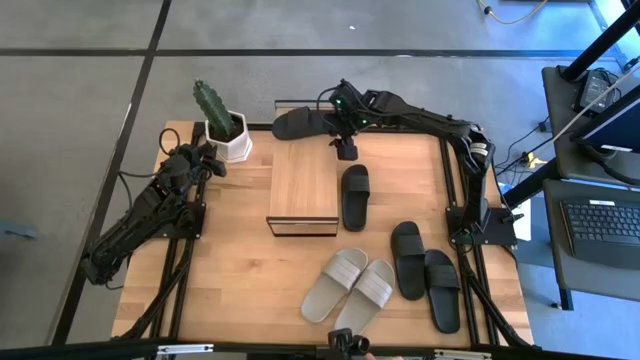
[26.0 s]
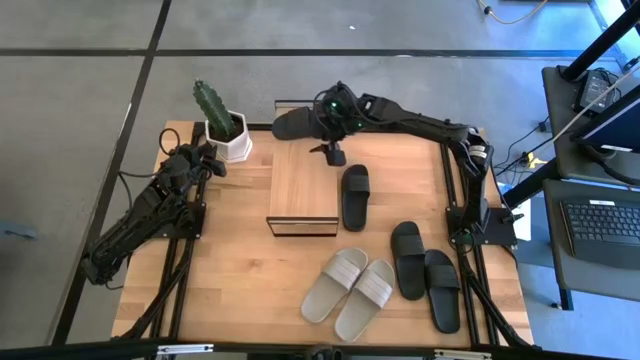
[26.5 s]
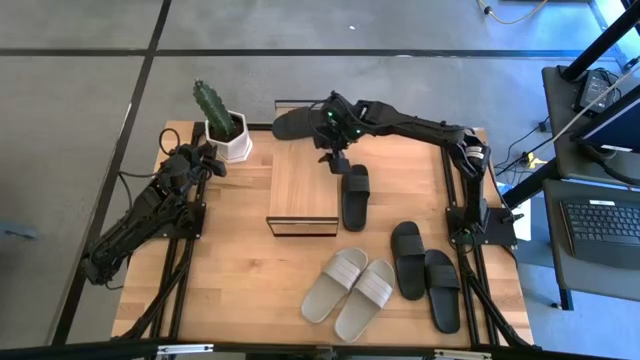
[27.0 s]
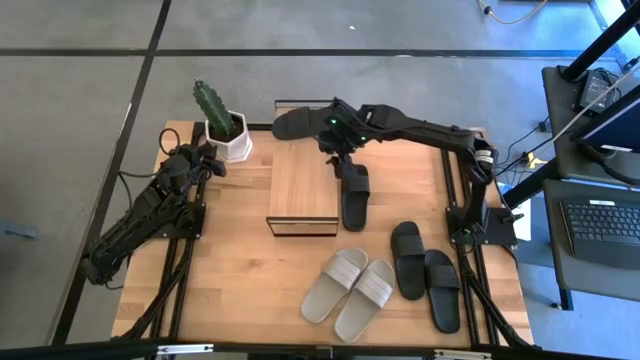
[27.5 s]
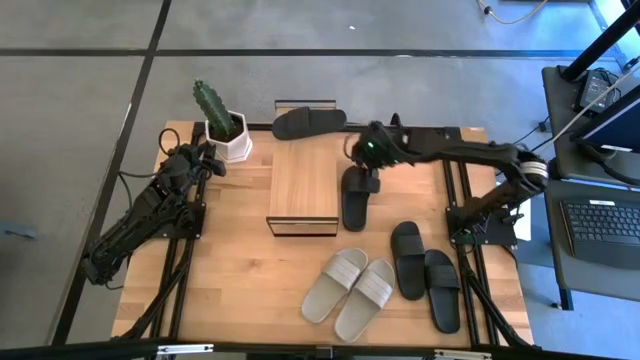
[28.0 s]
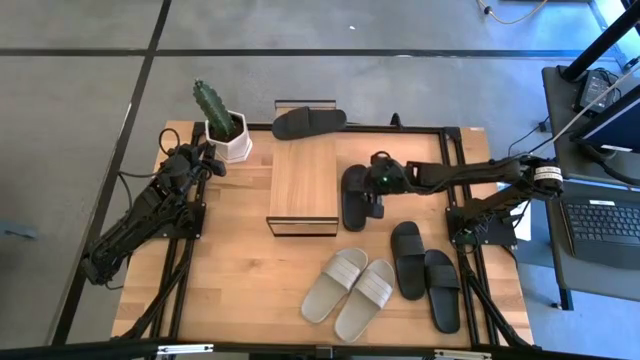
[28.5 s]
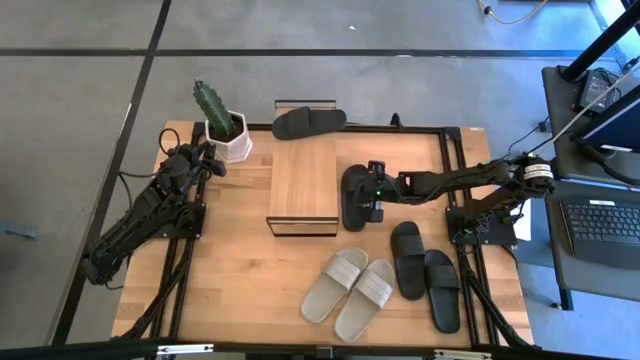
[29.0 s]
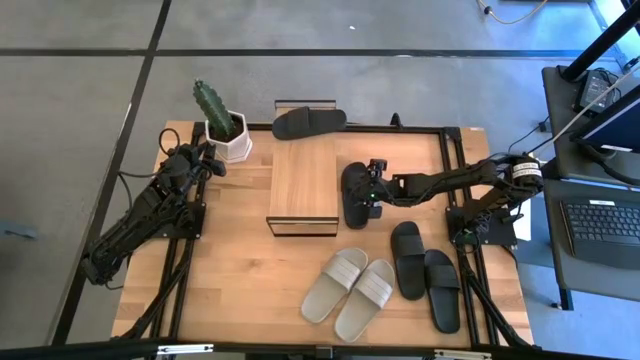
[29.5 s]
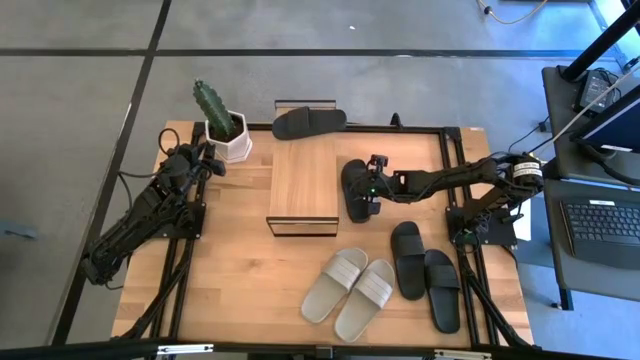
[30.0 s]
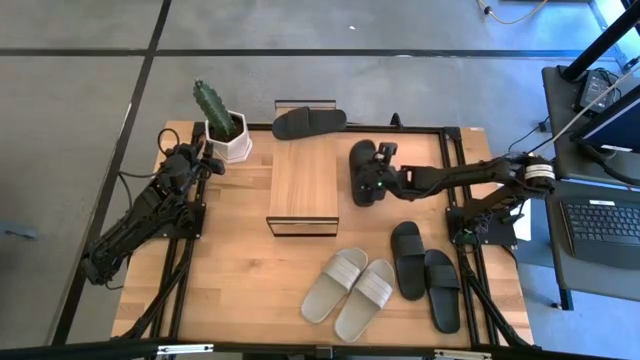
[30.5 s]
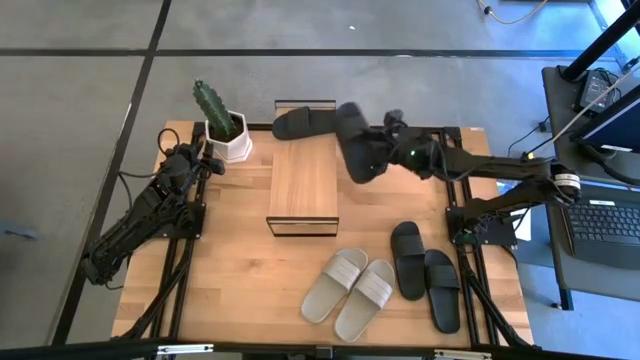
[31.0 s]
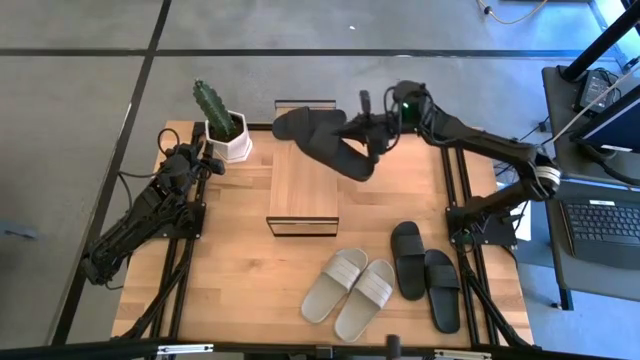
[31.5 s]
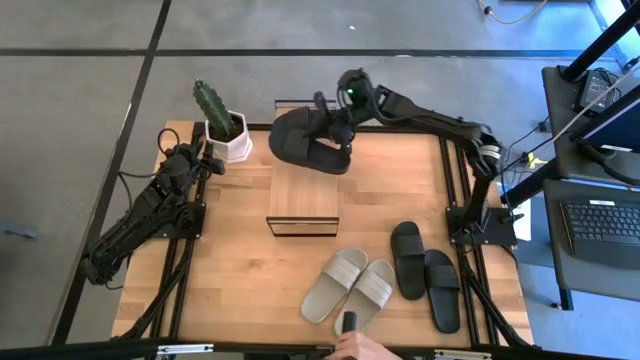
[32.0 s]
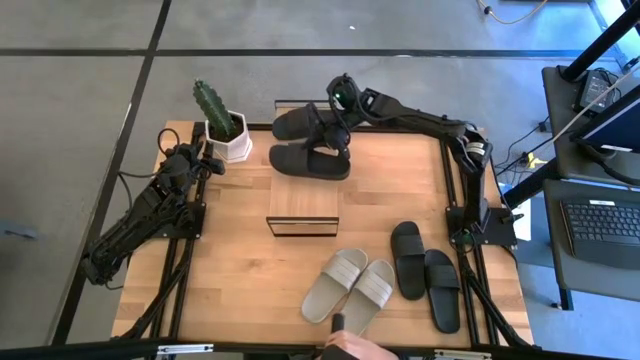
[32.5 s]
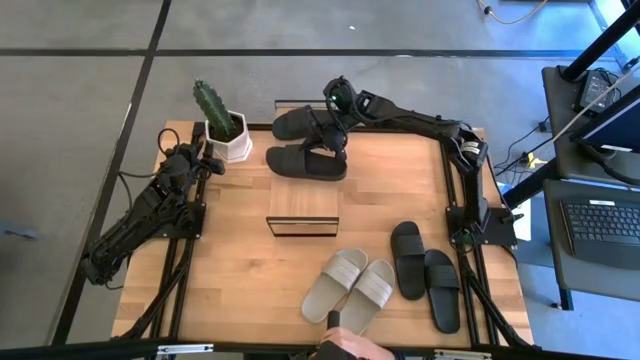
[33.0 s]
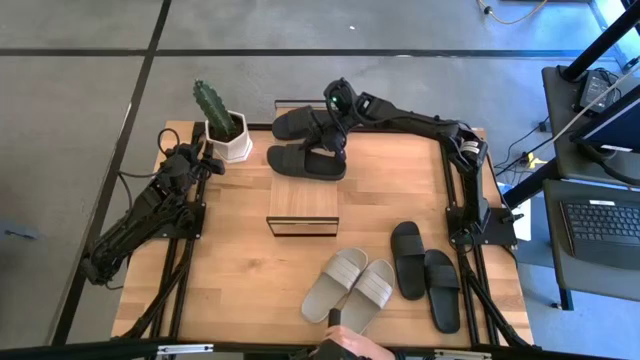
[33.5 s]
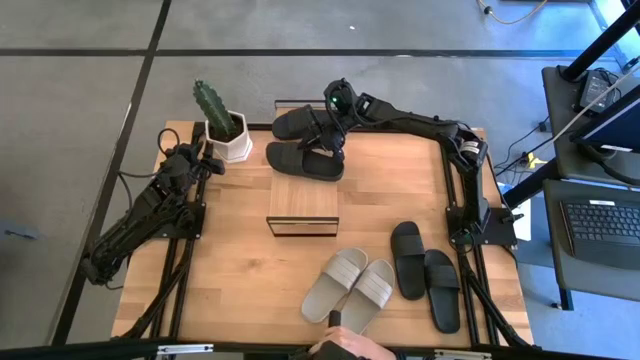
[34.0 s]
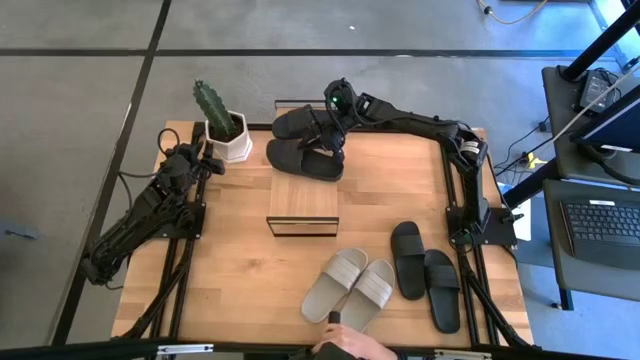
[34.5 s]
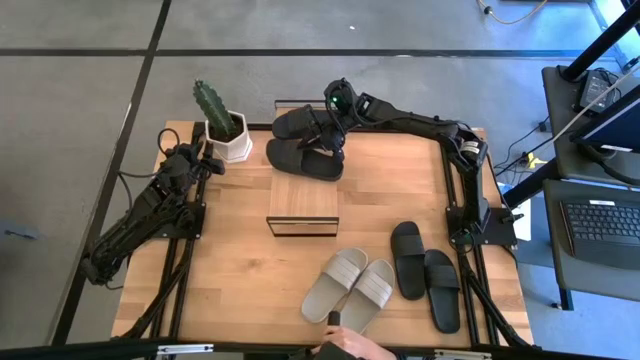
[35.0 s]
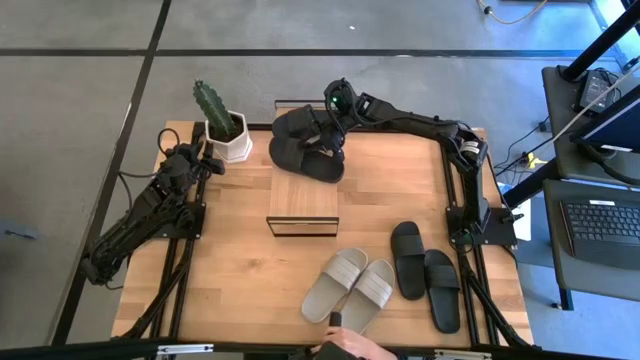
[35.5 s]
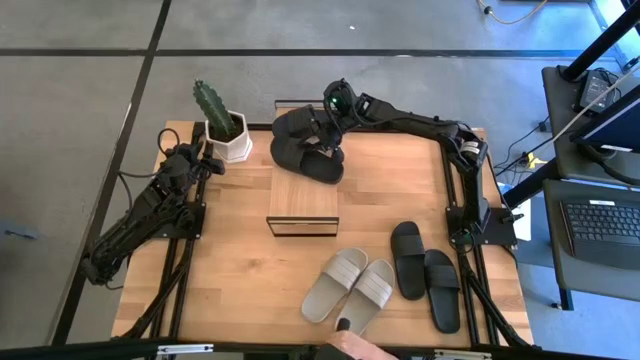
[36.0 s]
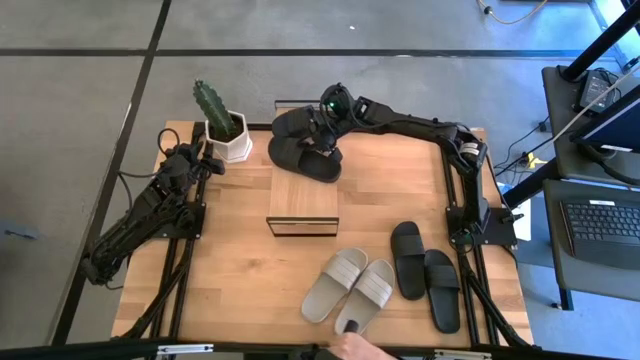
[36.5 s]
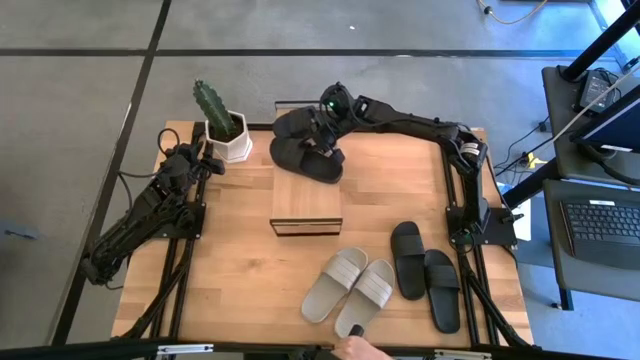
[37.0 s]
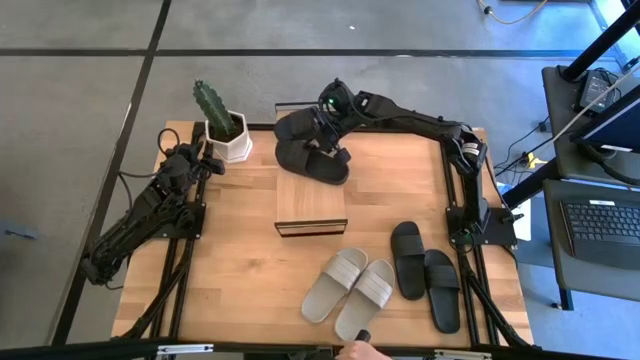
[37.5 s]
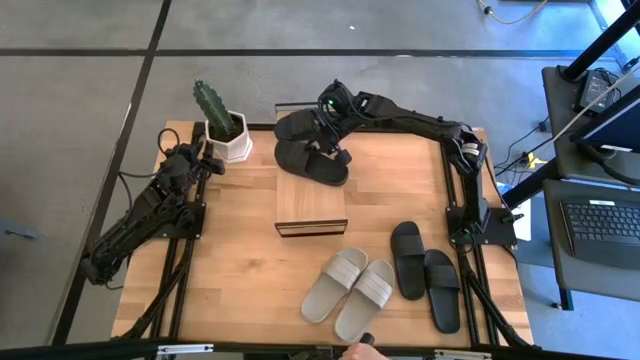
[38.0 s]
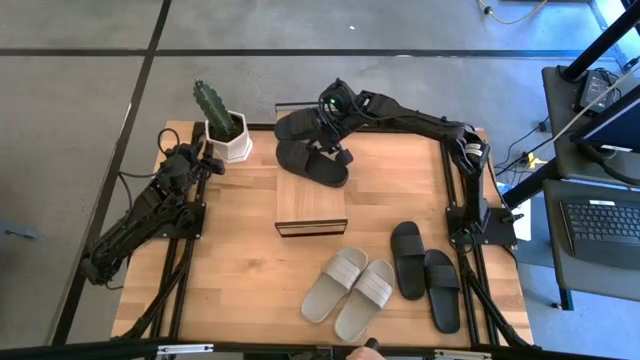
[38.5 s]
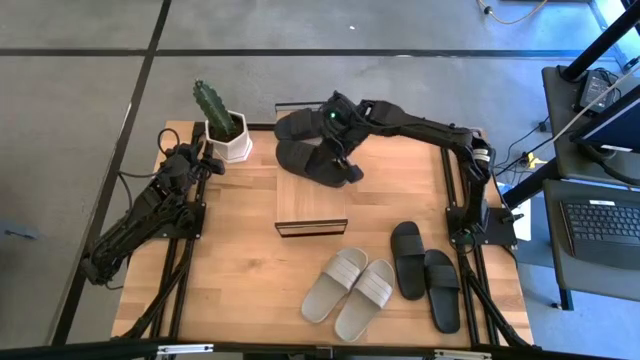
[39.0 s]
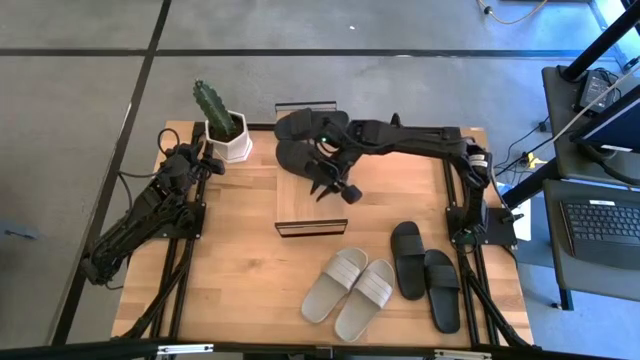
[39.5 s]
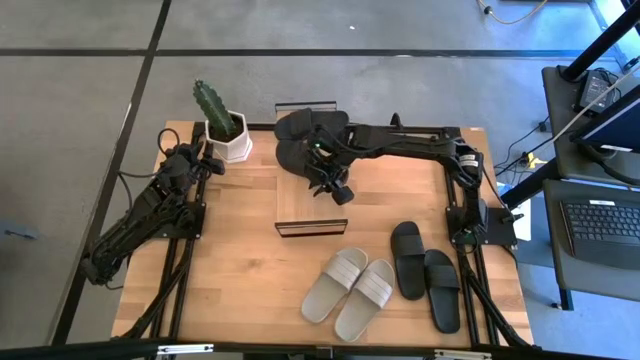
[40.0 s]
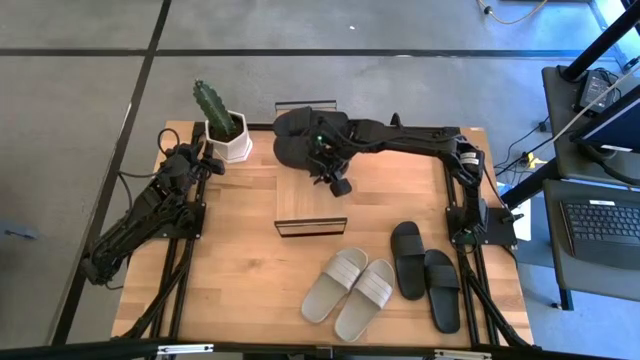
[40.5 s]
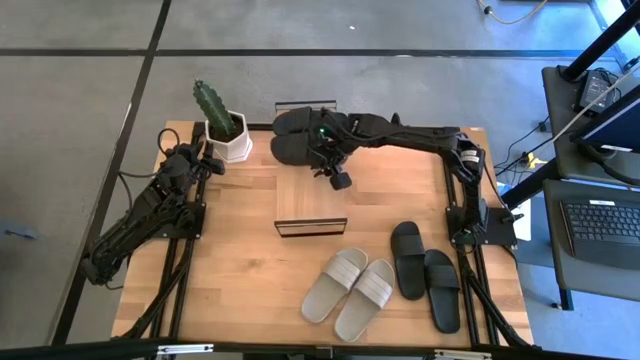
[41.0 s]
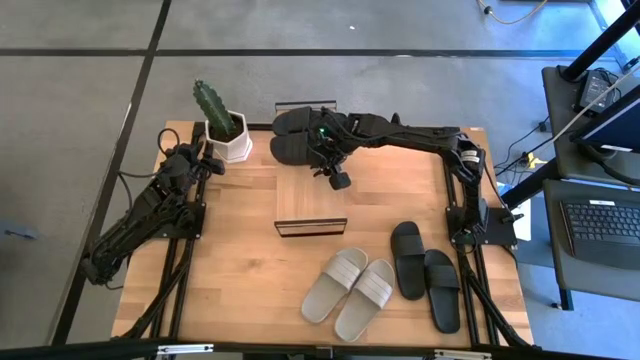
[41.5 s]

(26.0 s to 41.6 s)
Task: Pick and place slides into the shelf
Put the top left black slide on the shelf

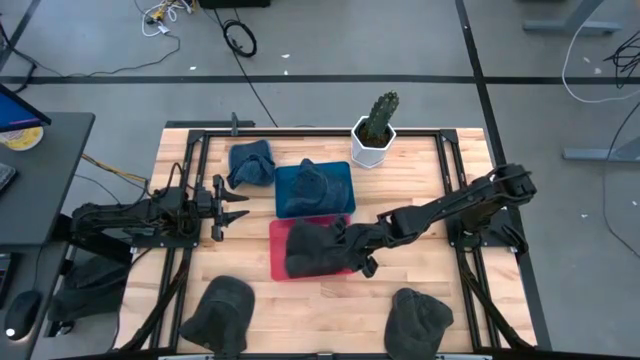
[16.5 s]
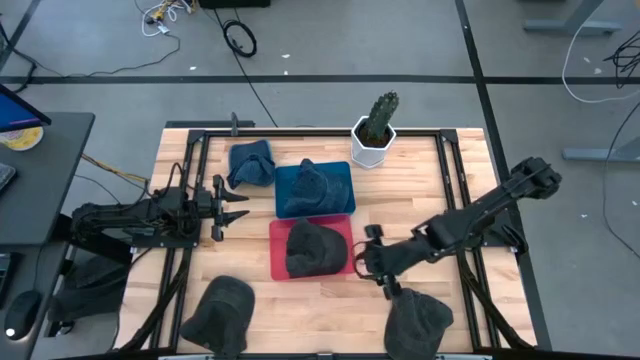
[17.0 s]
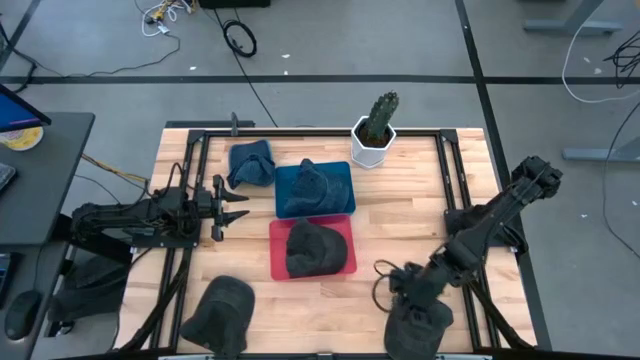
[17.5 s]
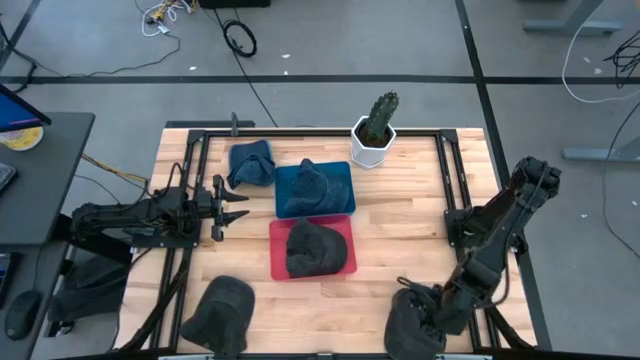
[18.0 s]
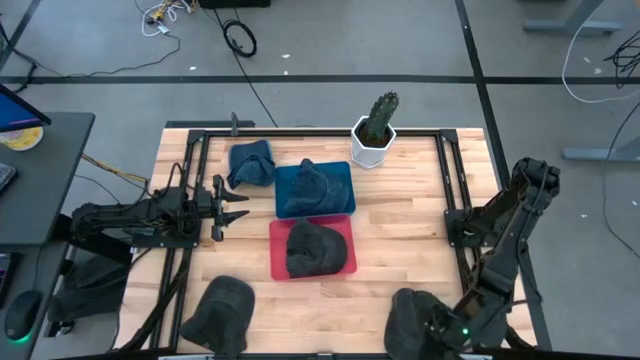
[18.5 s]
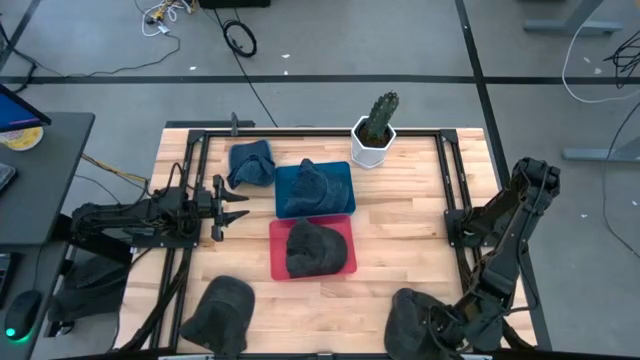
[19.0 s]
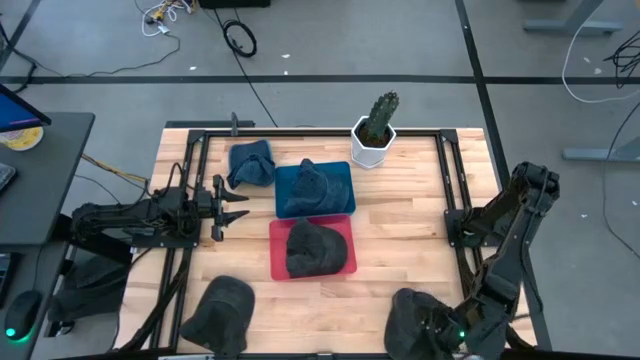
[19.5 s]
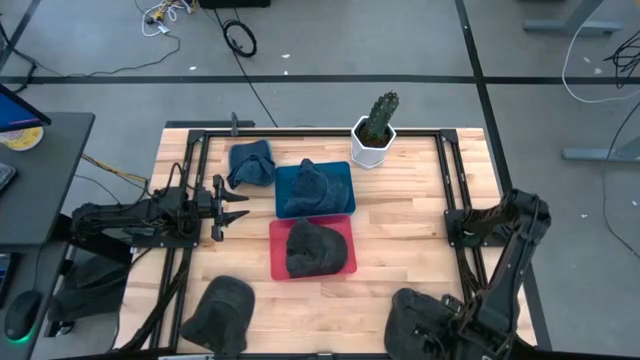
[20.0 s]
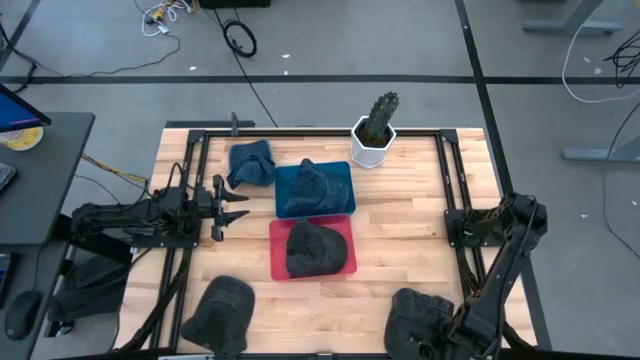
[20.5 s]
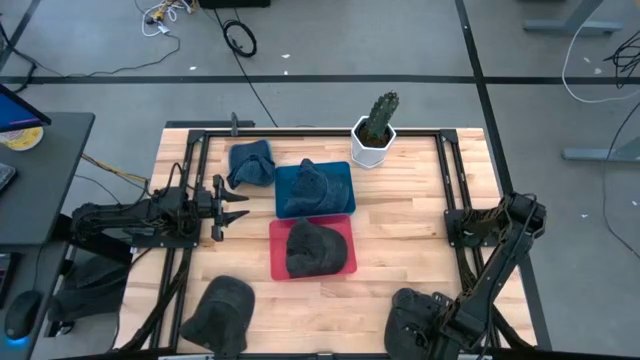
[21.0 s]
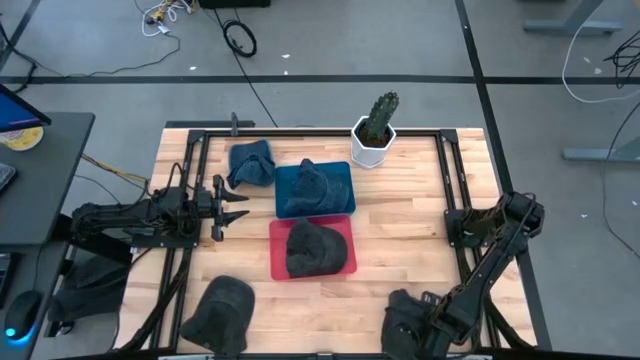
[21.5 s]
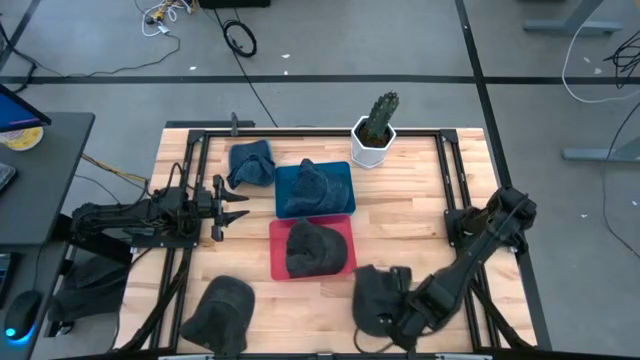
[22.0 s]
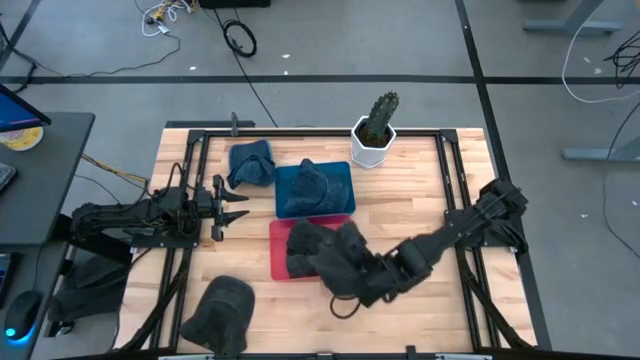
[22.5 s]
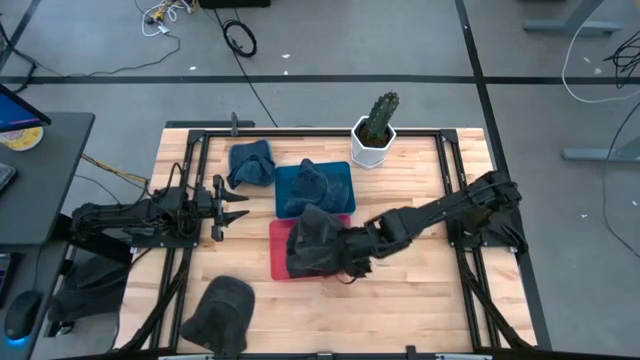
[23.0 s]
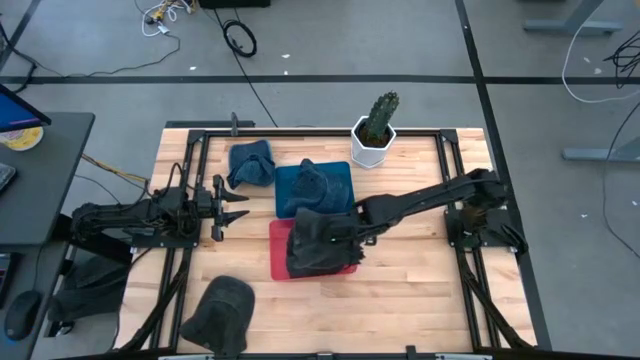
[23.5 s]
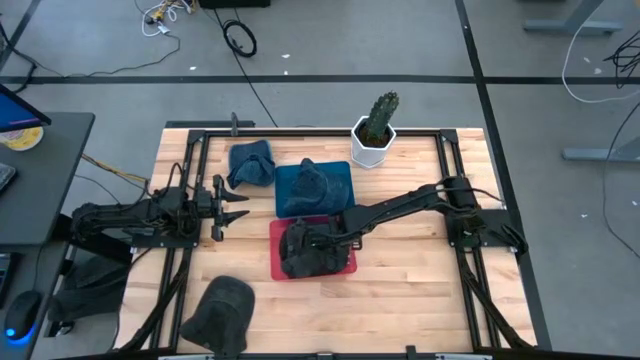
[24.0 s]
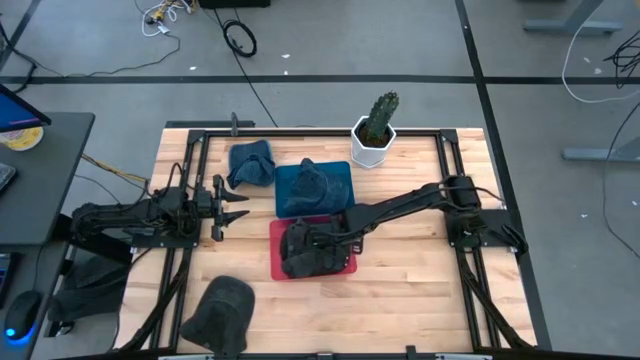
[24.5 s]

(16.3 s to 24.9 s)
Task: Pick & Place hat
Put the right black cap into the pink bin
